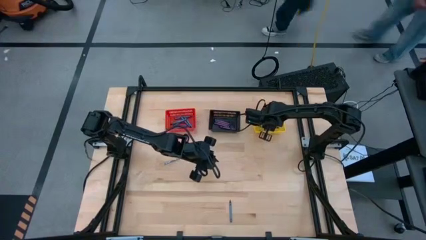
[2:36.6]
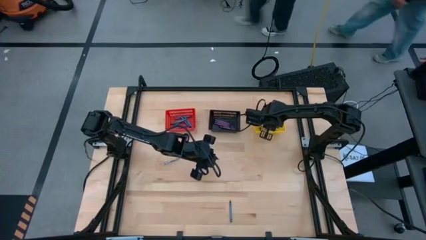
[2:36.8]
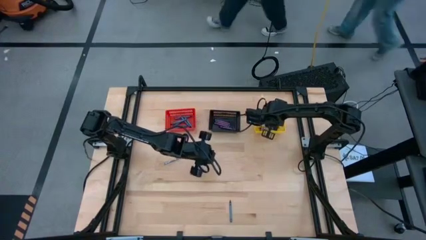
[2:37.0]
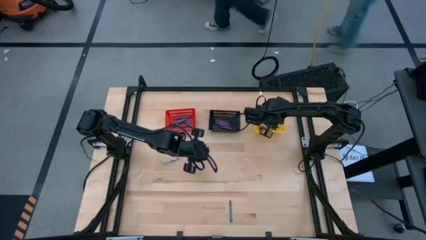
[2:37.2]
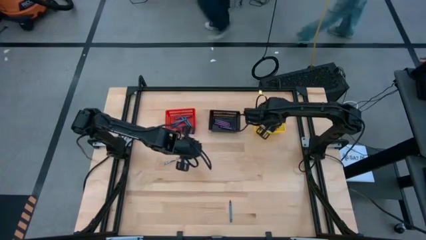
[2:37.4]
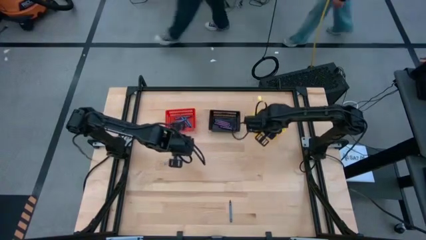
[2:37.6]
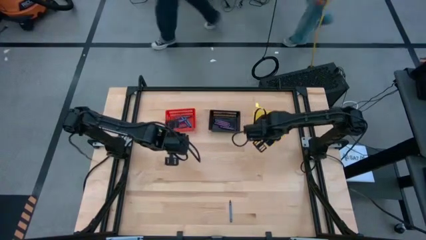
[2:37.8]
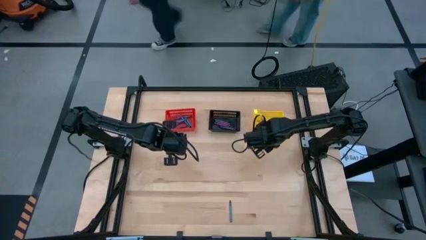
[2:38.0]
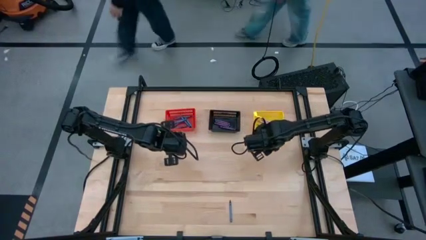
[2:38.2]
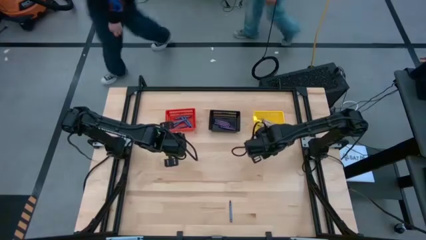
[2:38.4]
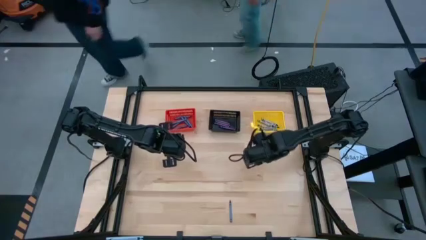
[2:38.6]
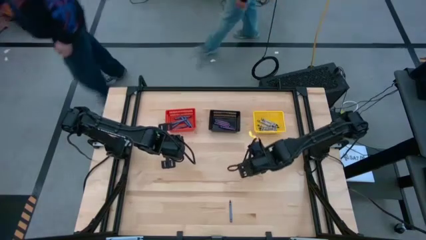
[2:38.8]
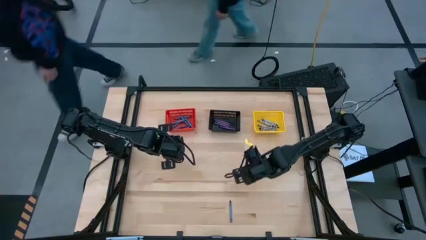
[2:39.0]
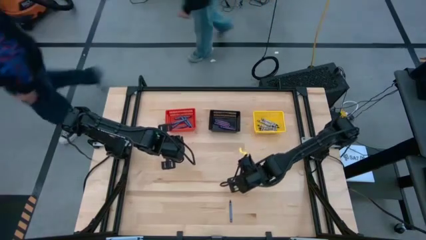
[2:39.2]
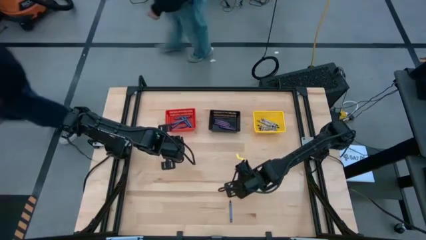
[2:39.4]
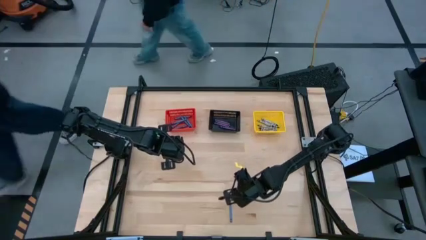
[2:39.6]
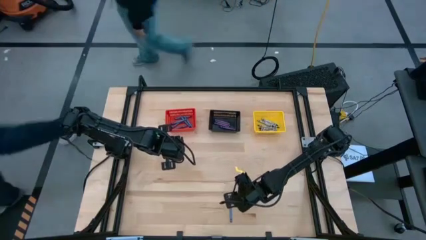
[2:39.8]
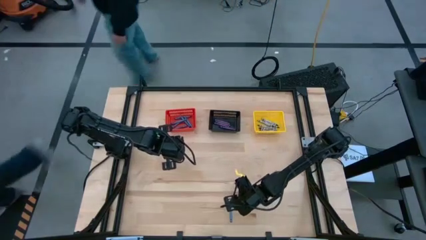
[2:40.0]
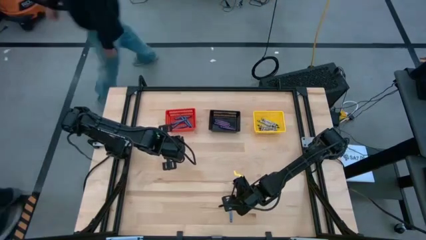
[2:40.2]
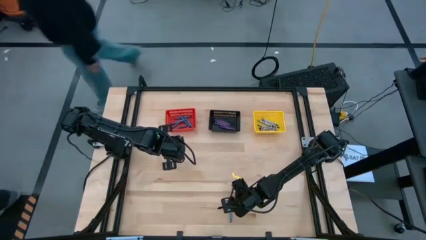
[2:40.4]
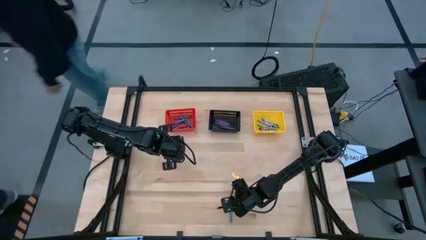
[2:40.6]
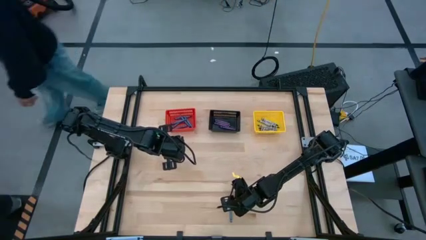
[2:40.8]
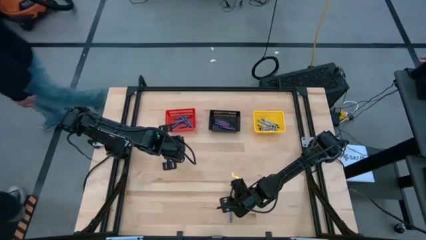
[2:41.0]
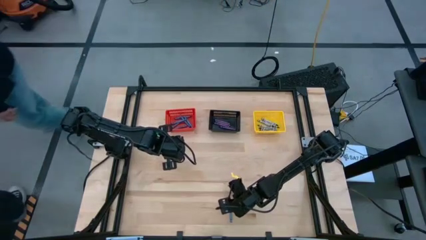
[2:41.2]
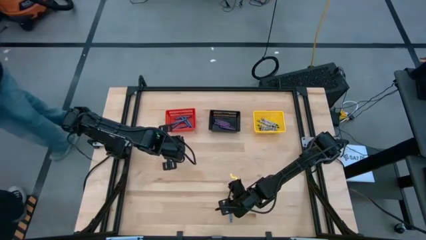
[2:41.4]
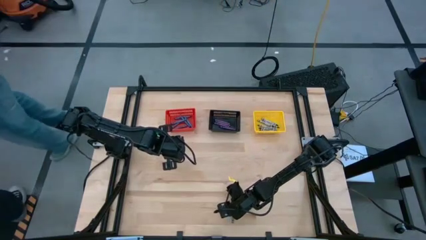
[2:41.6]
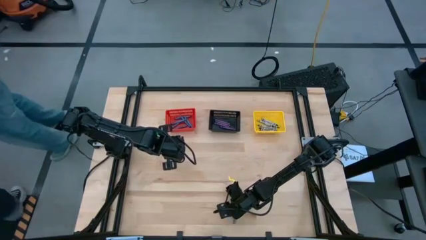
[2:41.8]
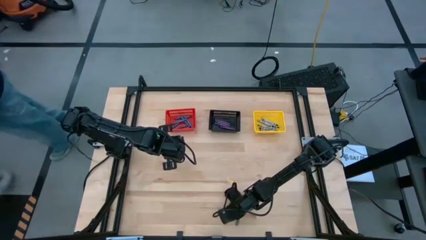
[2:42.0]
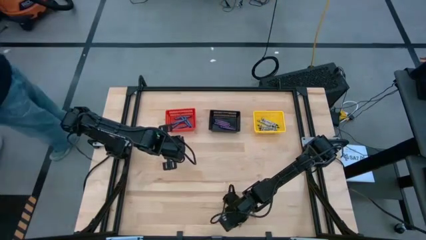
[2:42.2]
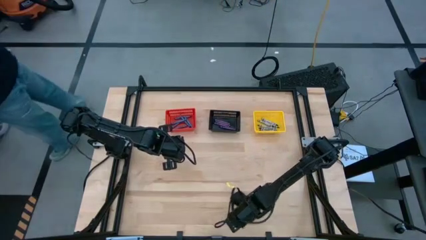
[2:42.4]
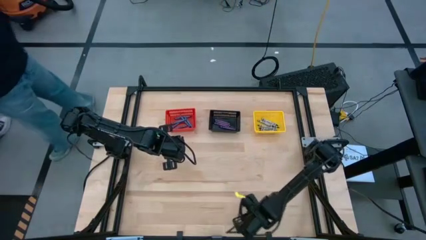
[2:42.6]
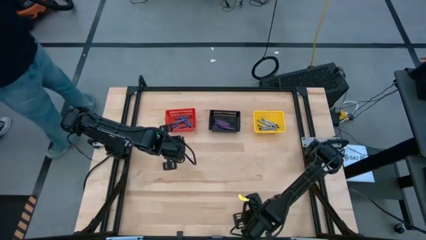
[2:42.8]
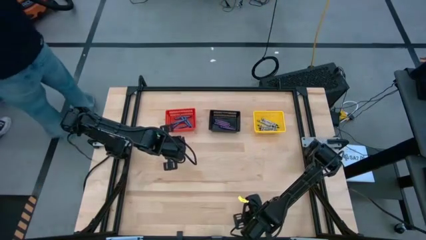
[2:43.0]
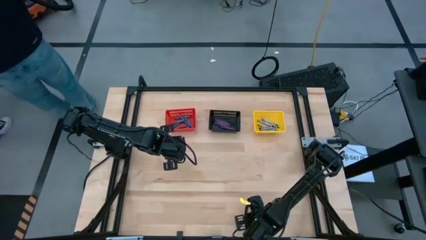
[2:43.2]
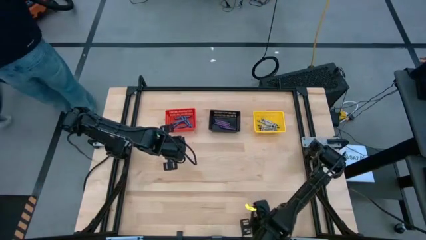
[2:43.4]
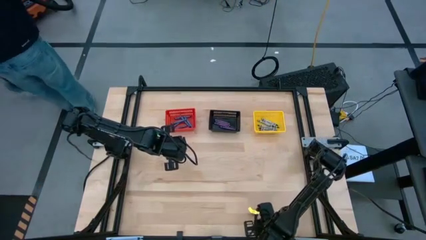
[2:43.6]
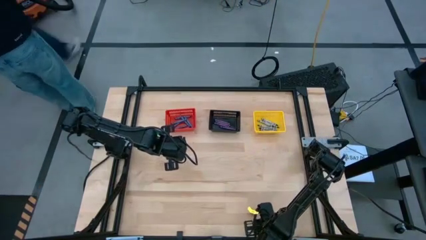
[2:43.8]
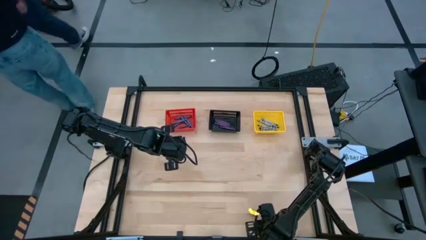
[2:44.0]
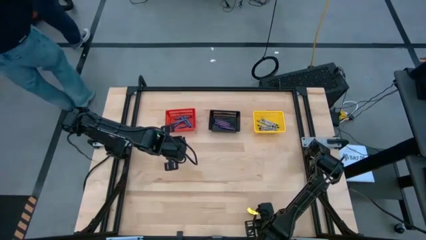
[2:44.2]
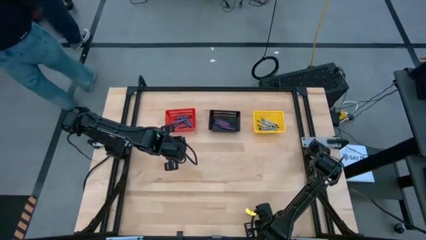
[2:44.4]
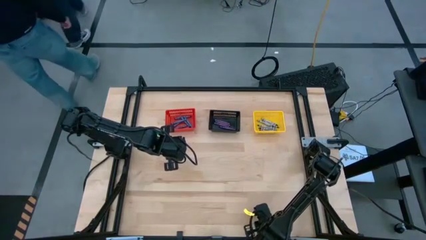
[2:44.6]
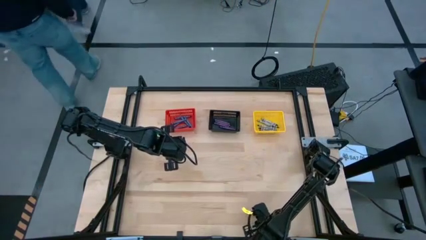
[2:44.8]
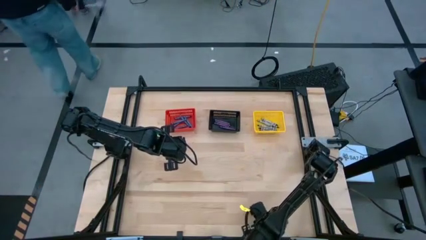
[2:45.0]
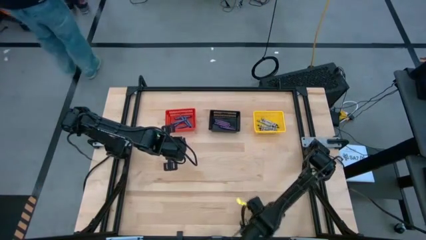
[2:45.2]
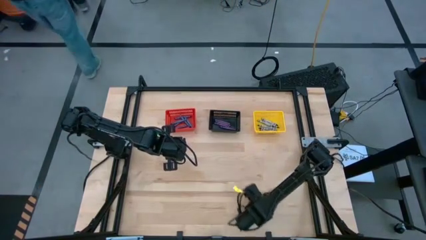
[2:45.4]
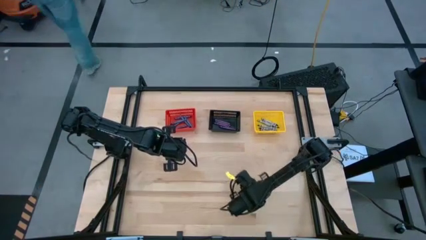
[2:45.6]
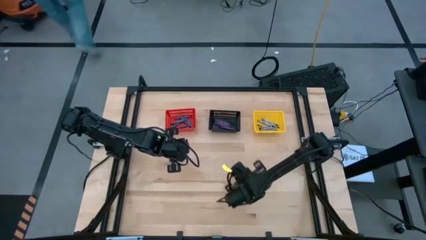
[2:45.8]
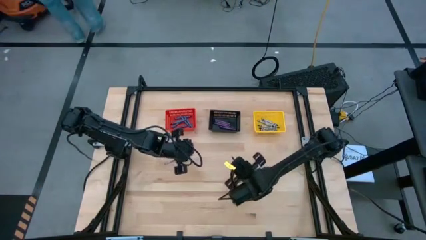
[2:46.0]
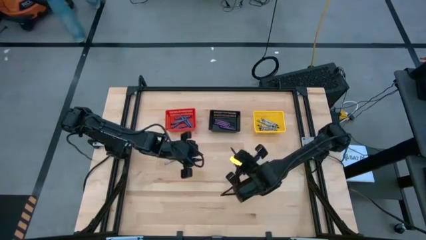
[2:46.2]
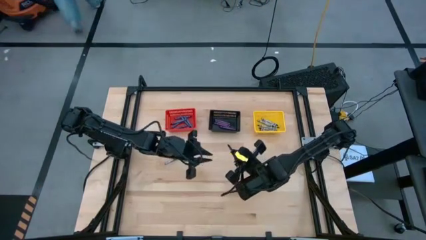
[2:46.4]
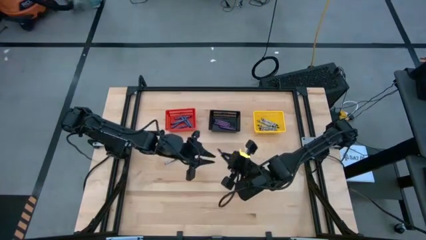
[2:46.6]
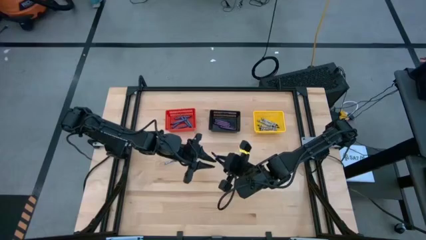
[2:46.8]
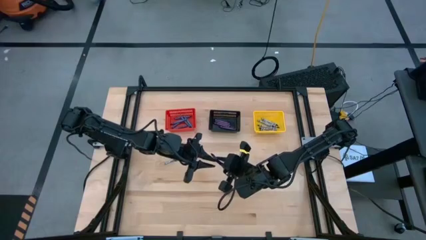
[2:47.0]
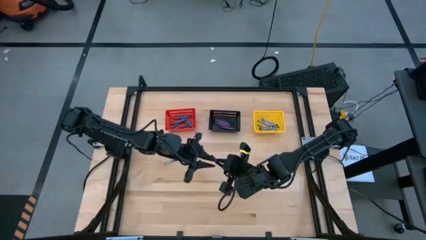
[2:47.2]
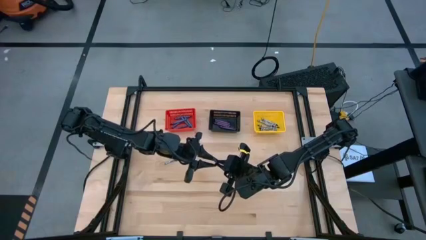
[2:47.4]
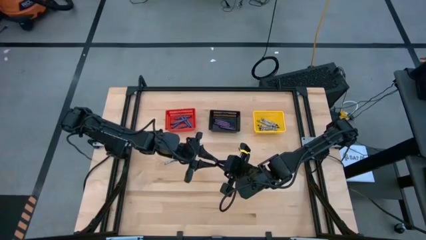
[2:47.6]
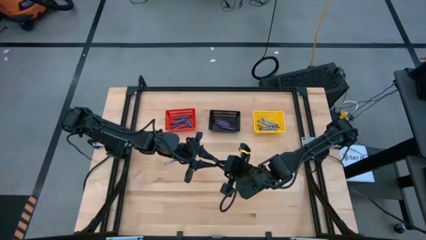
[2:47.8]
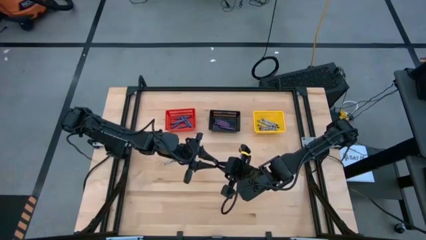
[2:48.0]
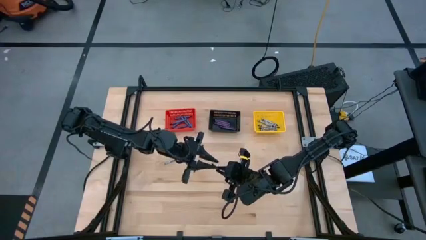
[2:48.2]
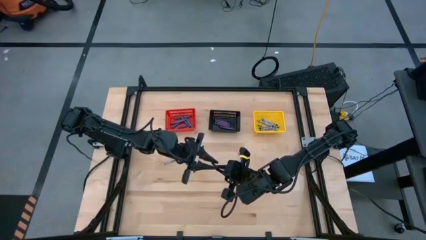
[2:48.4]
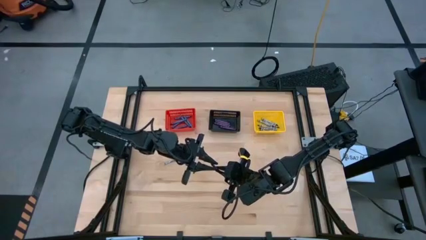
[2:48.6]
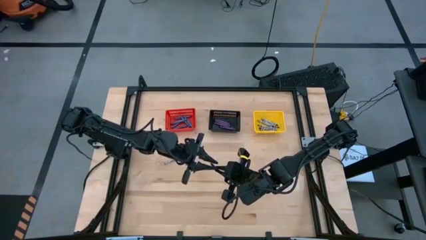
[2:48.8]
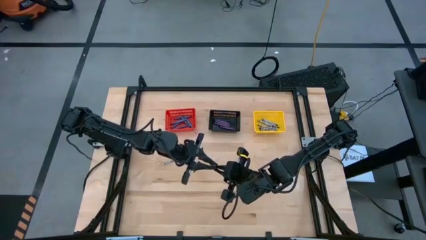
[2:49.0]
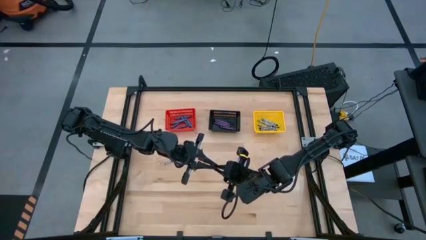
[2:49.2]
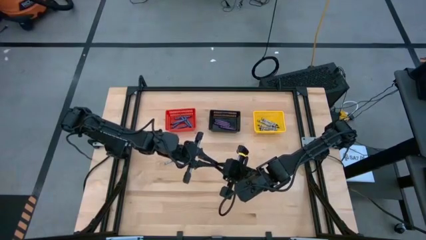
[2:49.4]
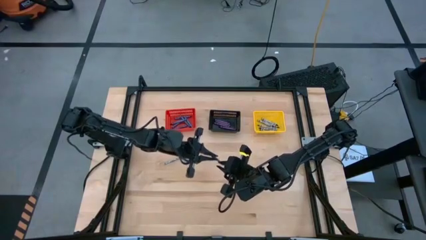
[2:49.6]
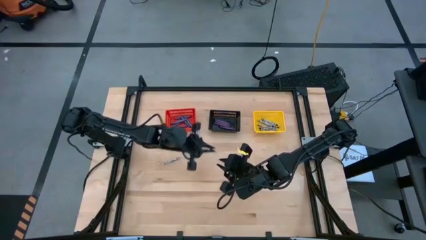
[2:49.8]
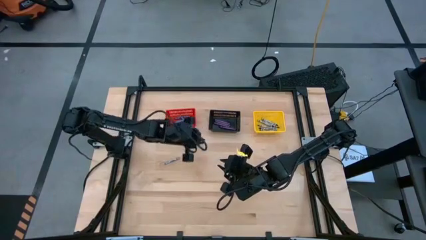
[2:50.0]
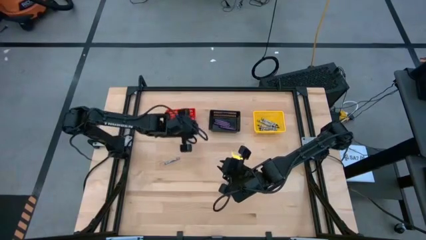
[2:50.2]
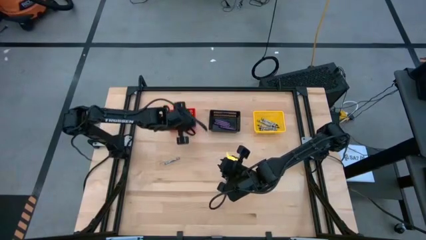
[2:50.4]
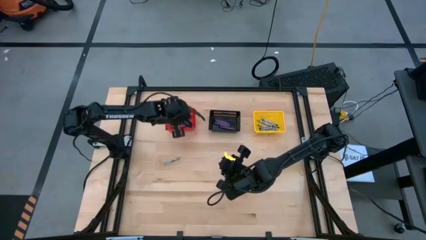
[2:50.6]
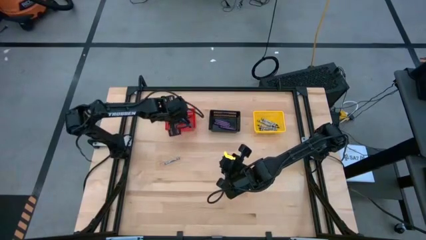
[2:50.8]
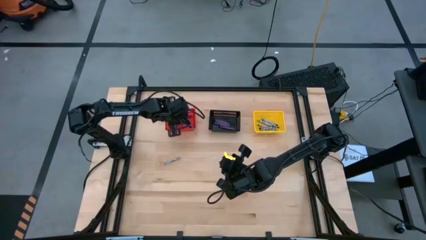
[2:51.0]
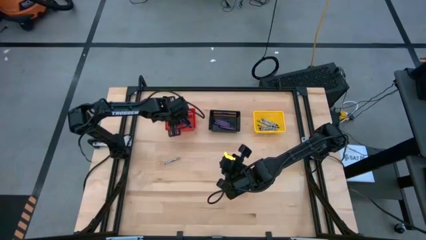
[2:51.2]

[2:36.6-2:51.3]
Task: Sort crayons
Put the blue crayon into the red bin

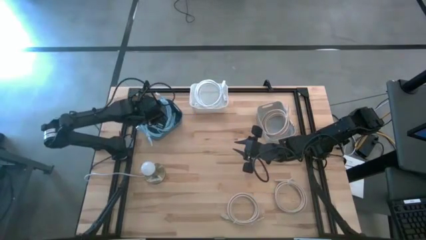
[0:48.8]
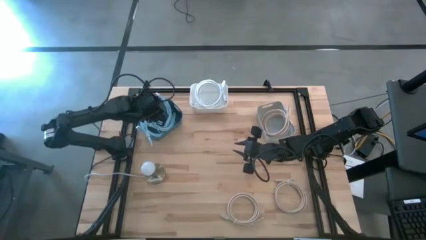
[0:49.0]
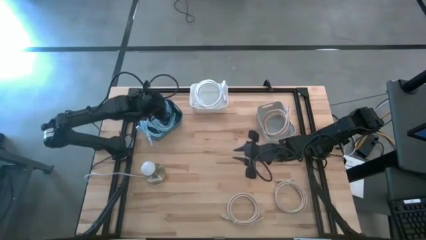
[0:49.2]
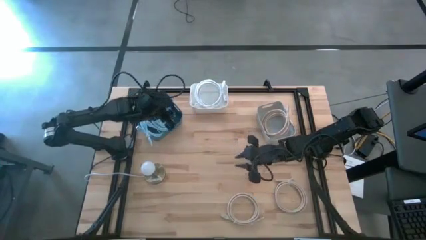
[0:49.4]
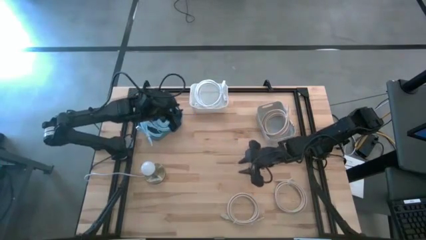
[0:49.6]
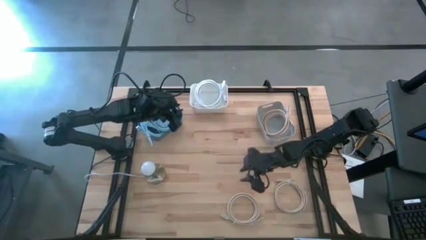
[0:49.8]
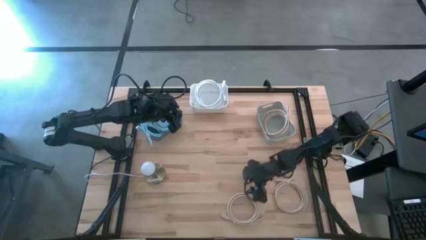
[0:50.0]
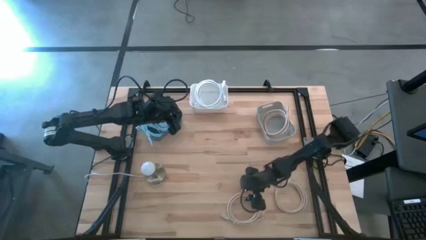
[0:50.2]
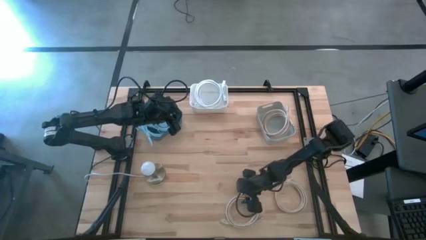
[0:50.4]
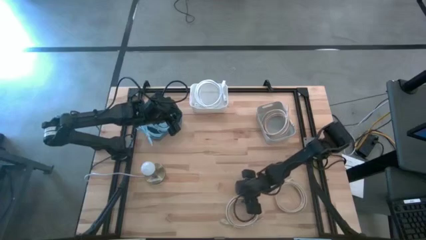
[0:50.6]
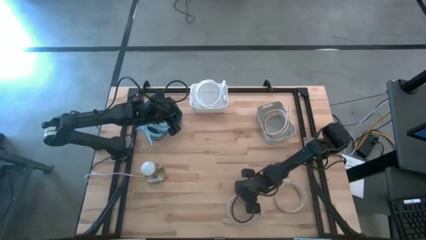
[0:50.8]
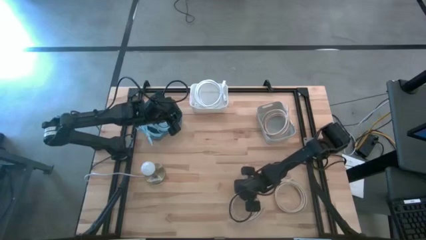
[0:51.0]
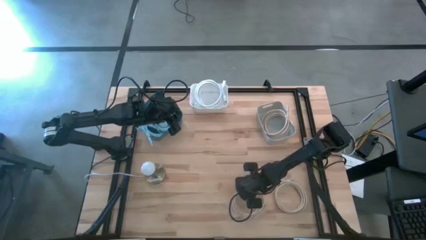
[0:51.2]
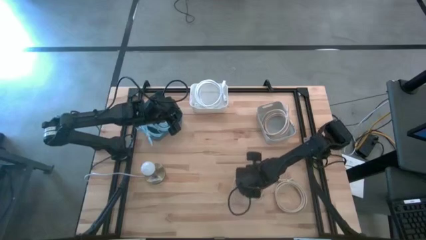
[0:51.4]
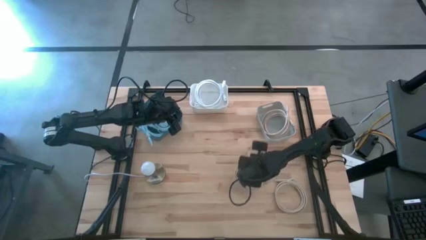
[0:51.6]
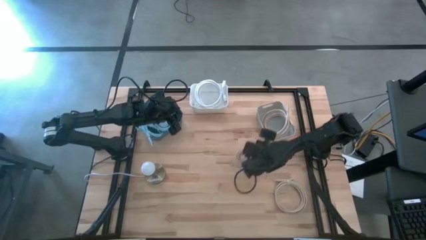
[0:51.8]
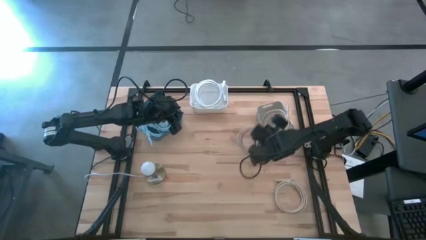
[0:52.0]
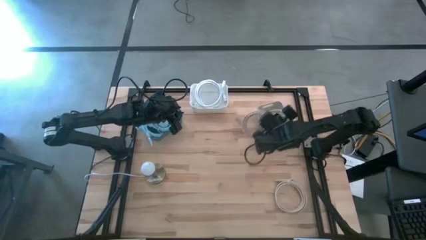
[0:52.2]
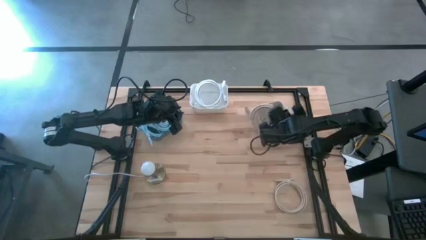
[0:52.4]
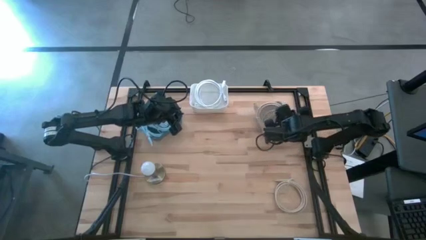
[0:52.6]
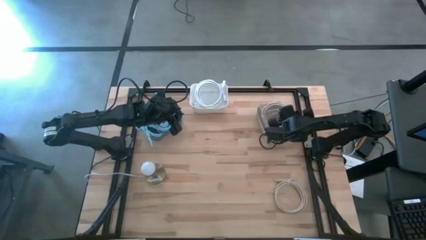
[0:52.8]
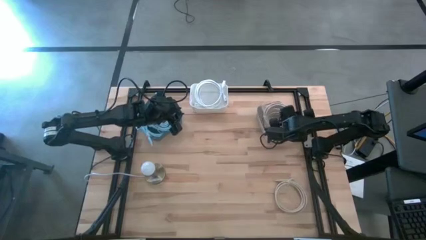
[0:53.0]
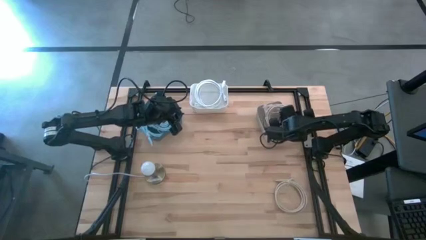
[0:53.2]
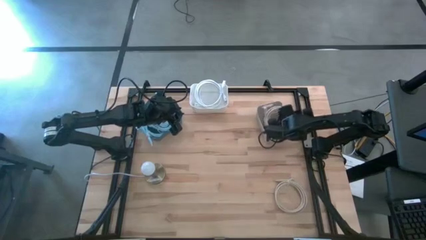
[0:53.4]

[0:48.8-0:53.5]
Task: Sort HDMI cables
Put the left brown hdmi cable into the gray bin
